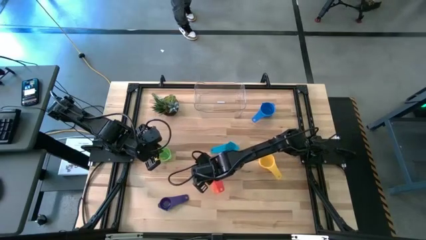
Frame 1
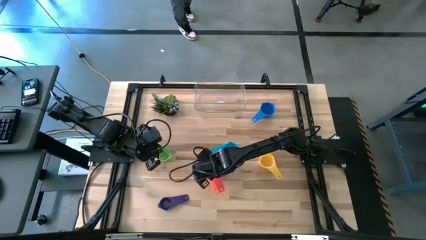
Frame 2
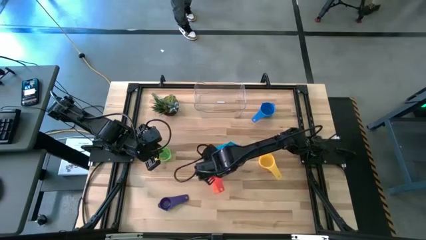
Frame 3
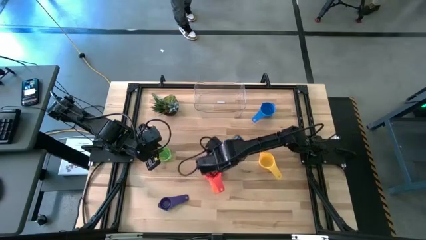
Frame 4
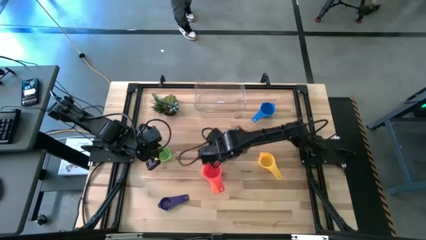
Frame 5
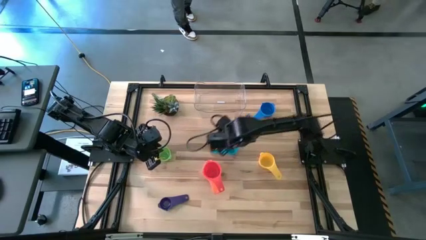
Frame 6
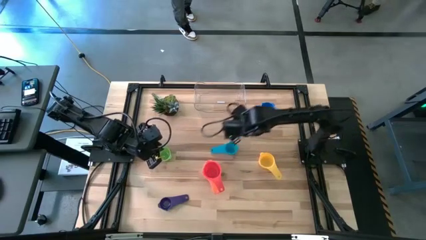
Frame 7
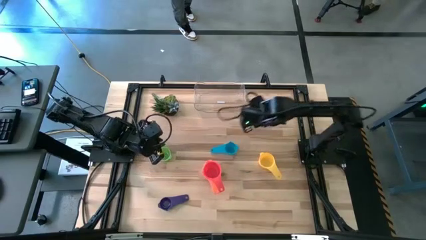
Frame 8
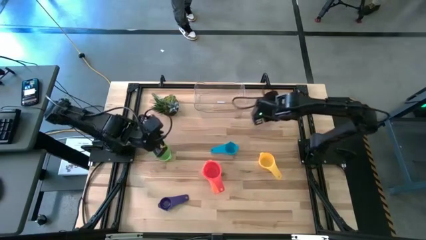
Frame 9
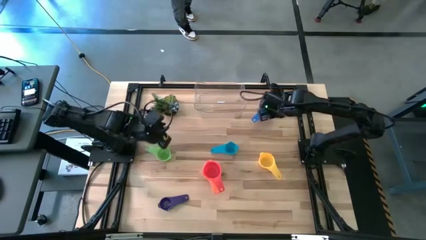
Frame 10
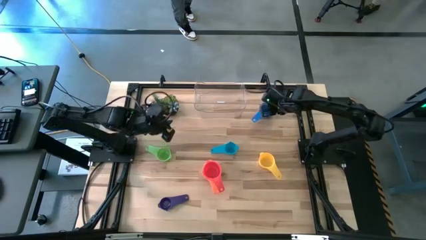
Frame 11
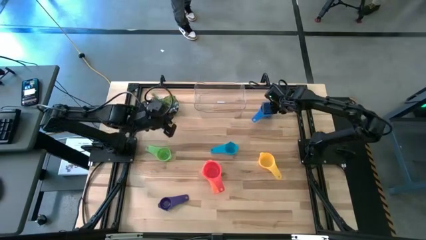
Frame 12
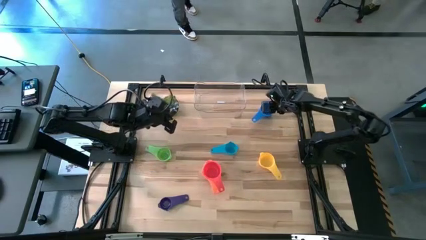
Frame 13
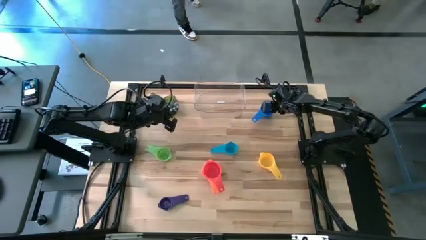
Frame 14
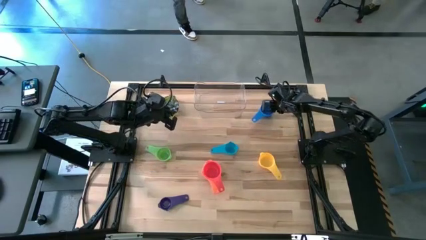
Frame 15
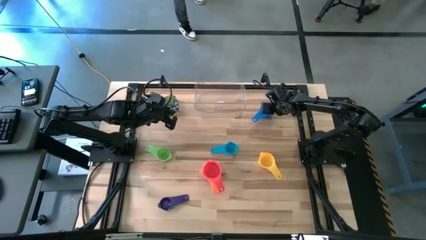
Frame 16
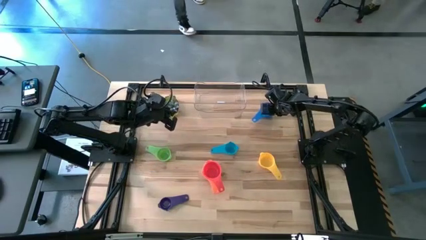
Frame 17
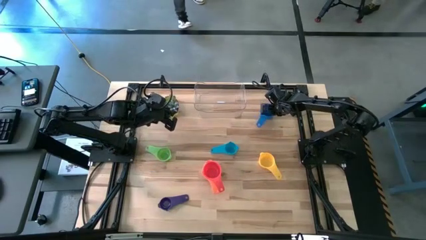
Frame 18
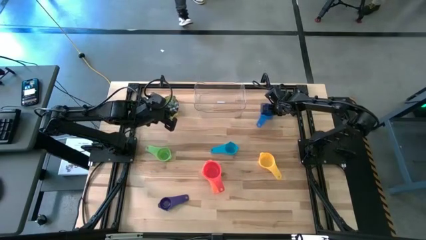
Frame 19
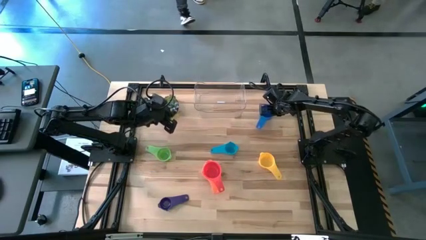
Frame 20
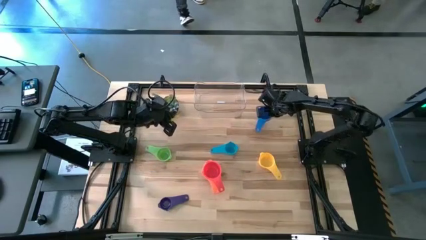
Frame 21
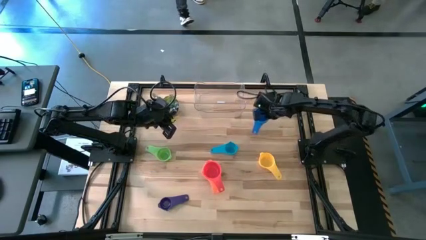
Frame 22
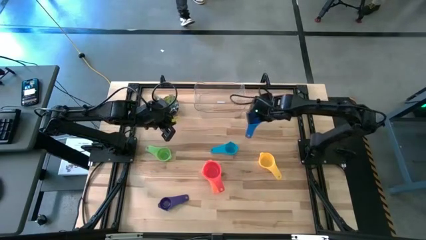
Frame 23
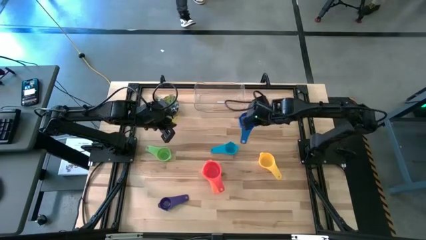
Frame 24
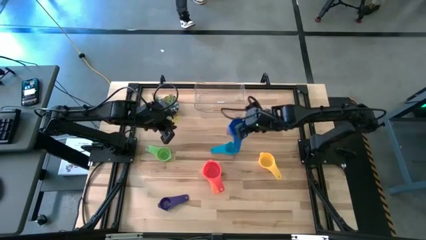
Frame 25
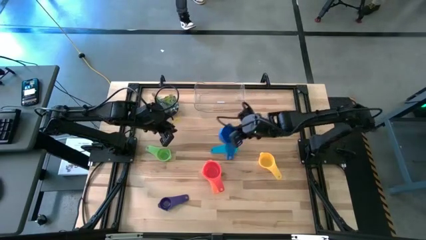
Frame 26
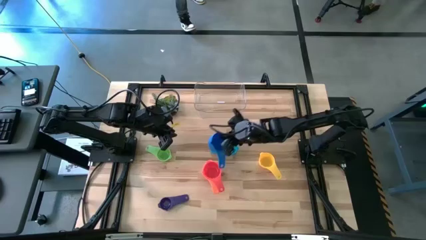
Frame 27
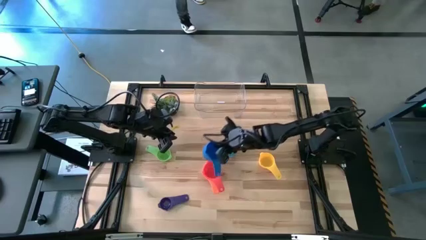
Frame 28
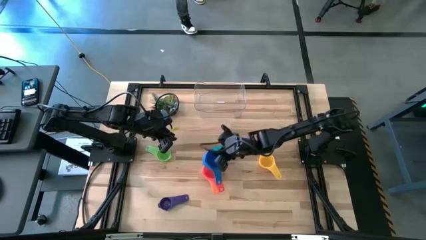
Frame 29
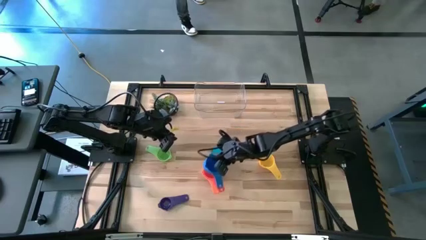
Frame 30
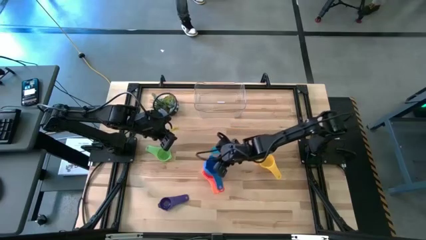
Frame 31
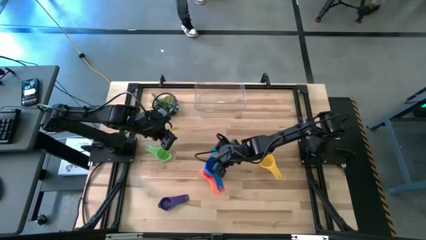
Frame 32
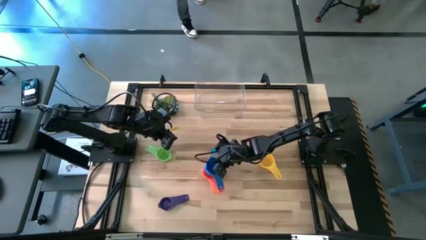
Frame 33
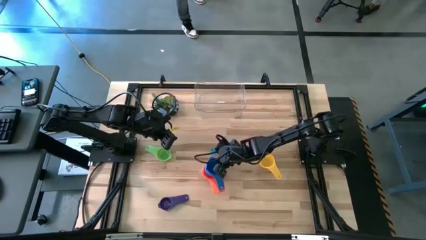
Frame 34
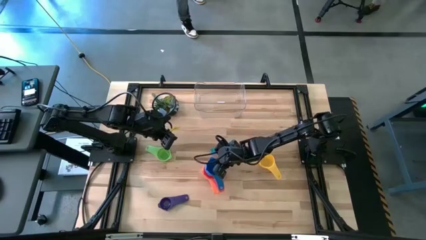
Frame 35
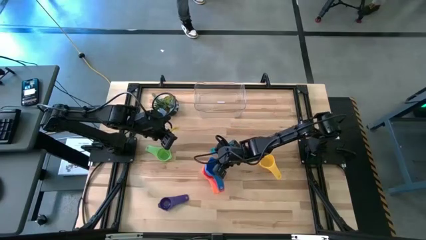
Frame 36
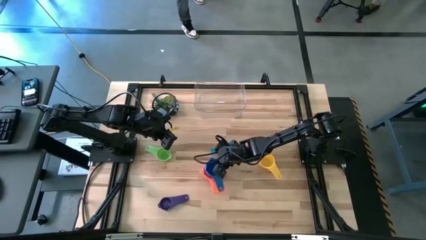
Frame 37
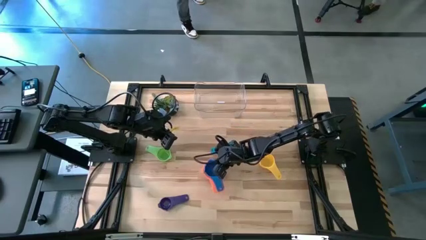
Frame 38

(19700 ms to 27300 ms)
Task: Nest measuring cups in basket
Stack the blue measuring cup on top of the red measuring cup

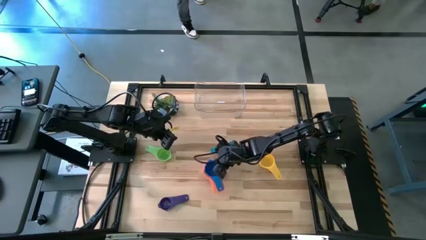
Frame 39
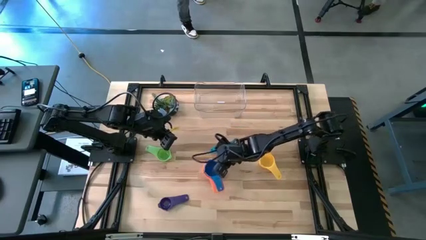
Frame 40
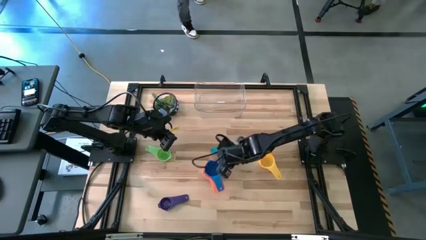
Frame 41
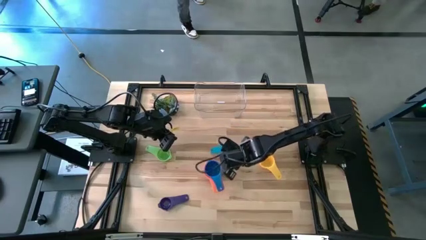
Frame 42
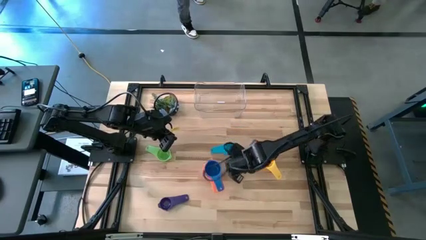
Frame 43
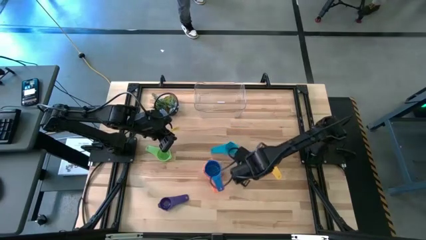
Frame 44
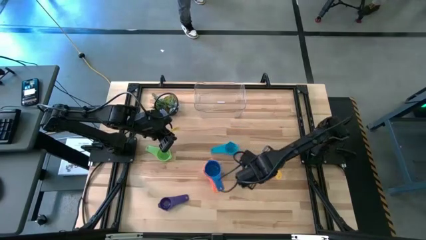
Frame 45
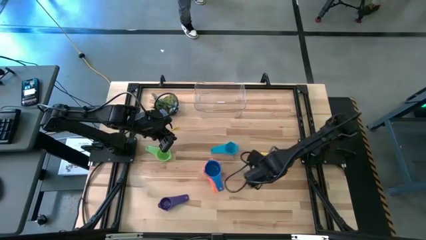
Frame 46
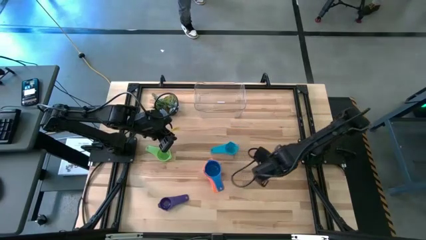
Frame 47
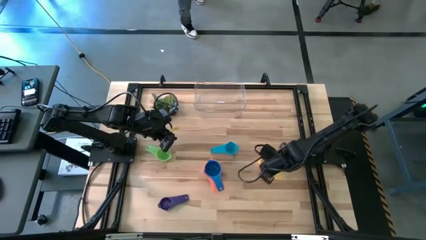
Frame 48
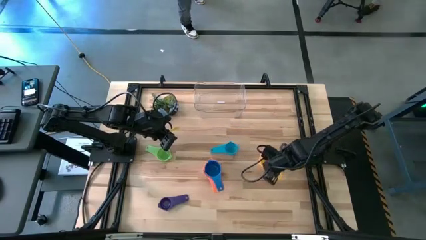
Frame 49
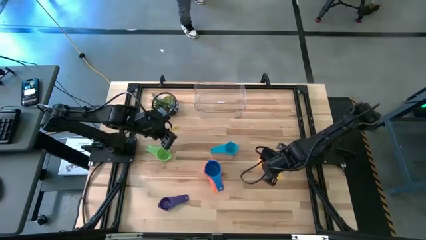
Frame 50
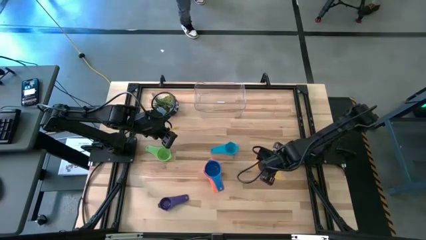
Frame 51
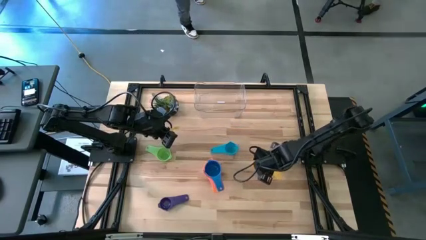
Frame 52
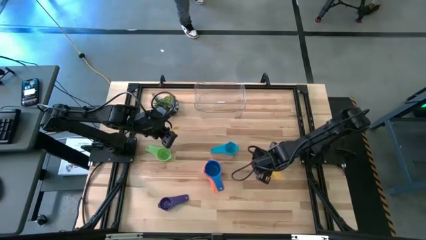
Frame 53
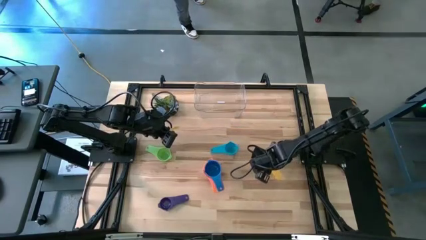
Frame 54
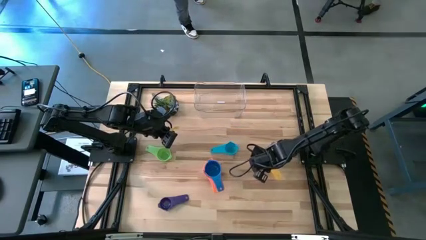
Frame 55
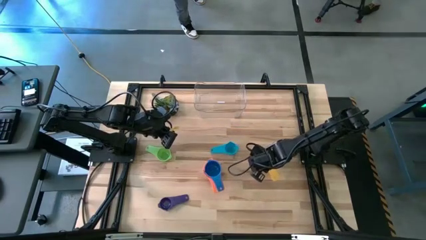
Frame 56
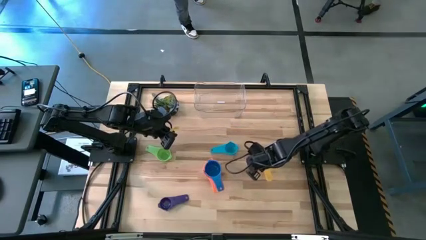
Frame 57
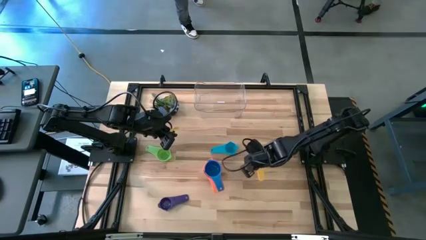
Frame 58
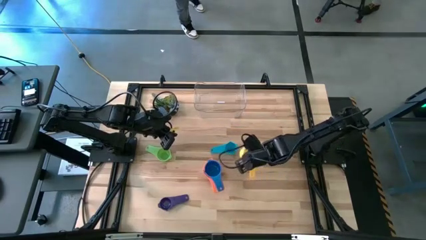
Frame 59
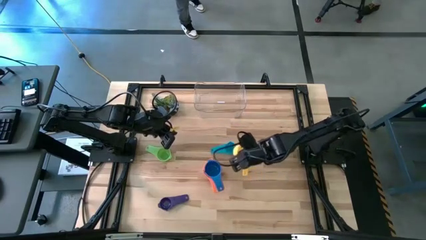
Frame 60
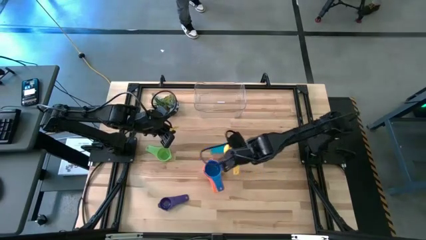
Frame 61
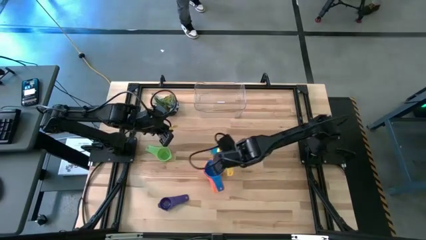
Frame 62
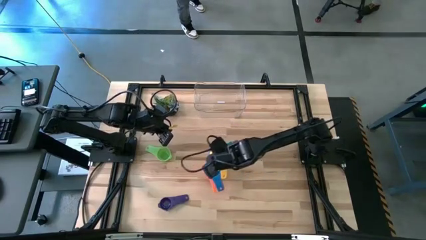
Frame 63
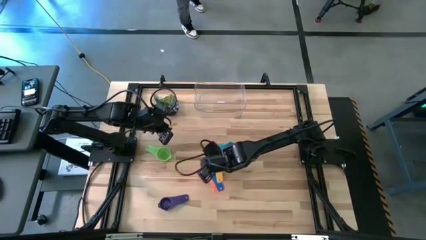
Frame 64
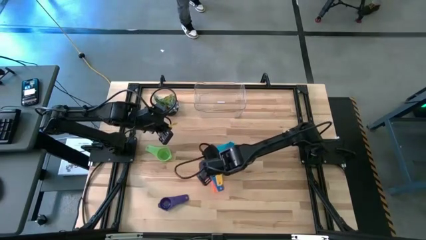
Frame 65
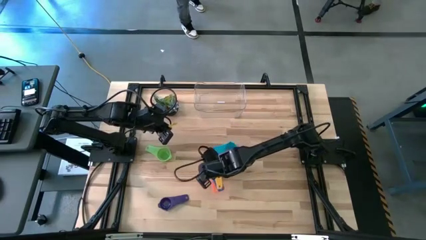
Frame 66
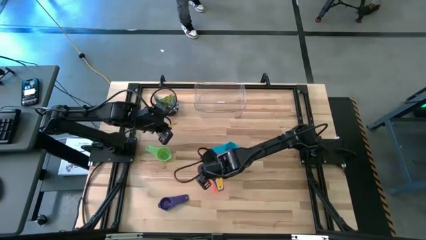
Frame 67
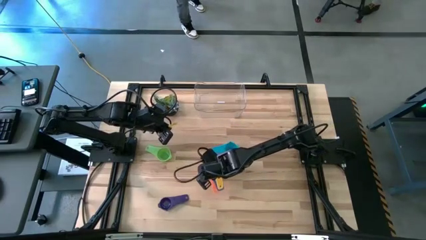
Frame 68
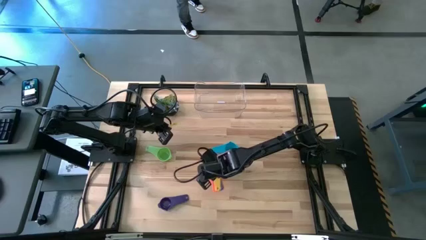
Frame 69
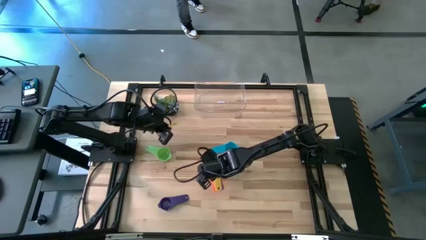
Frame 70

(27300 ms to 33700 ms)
Stack the yellow measuring cup on top of the blue measuring cup

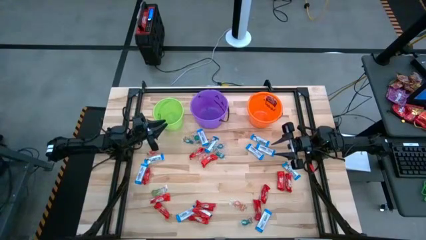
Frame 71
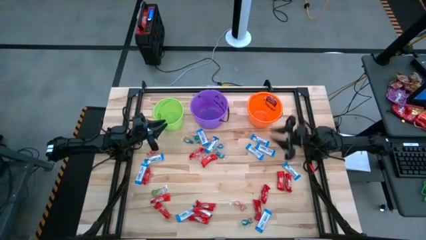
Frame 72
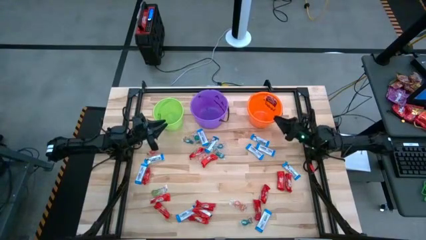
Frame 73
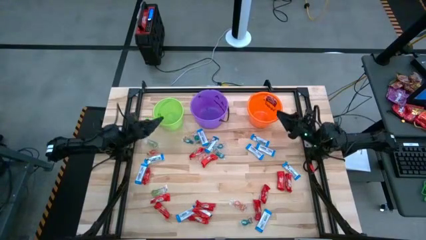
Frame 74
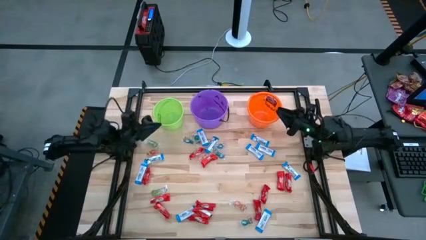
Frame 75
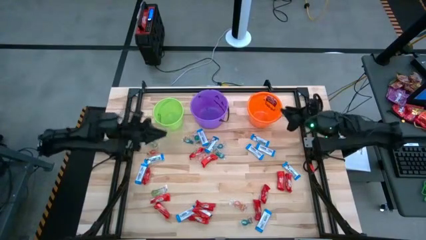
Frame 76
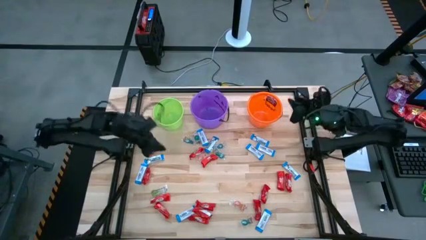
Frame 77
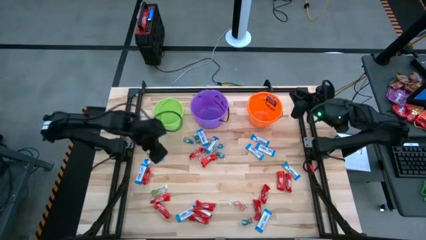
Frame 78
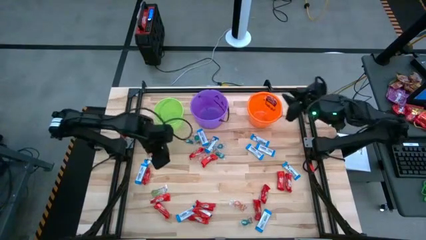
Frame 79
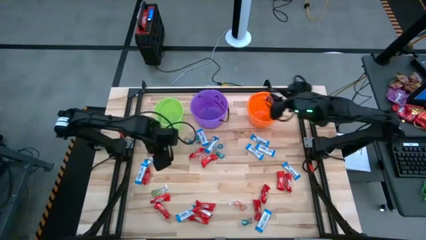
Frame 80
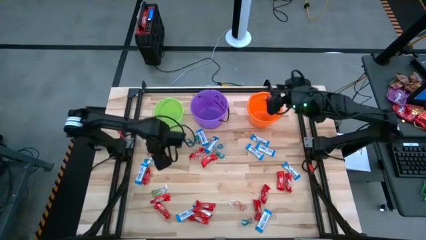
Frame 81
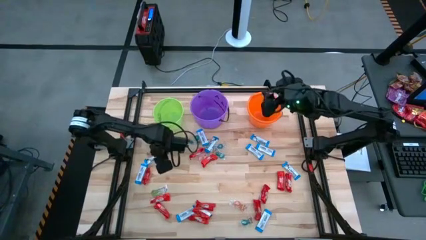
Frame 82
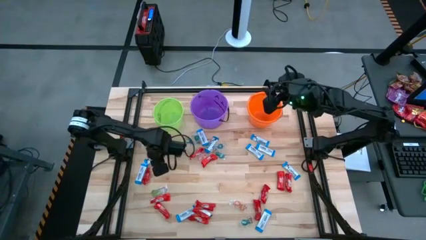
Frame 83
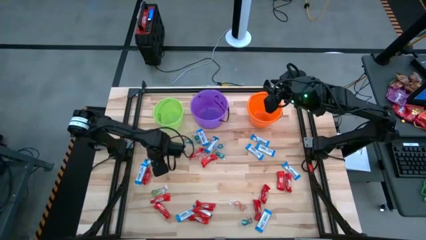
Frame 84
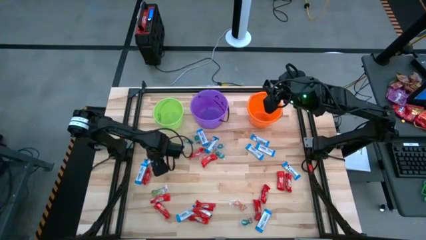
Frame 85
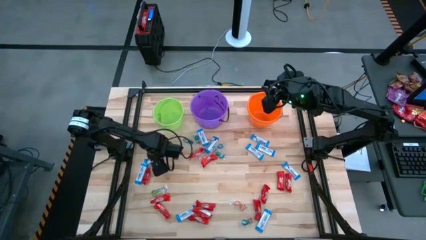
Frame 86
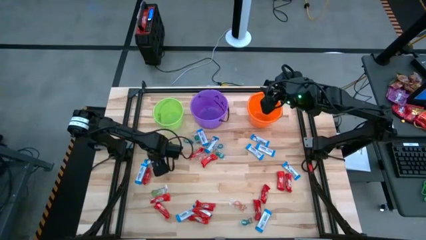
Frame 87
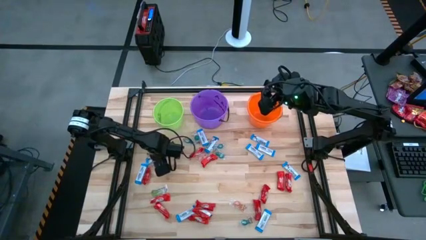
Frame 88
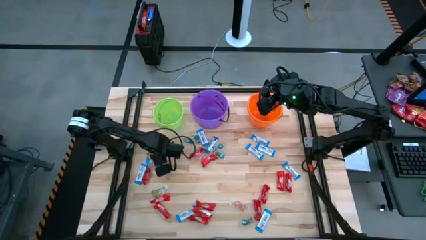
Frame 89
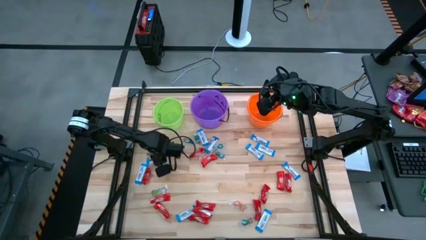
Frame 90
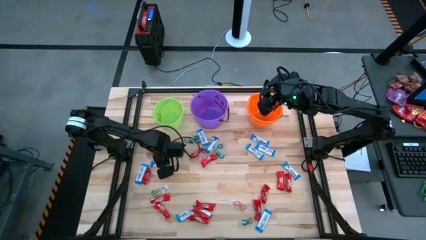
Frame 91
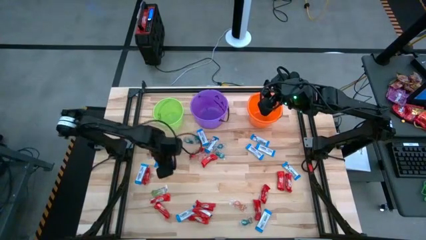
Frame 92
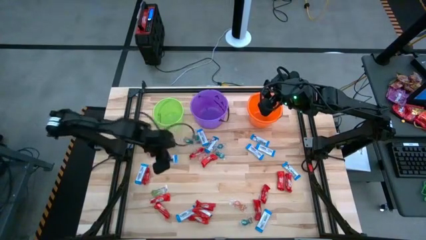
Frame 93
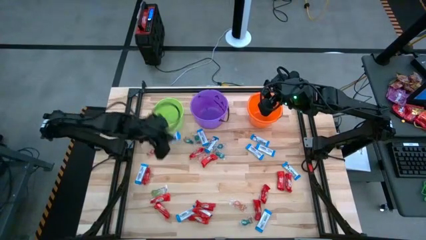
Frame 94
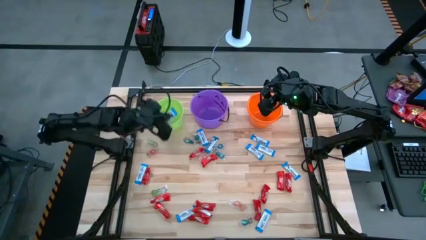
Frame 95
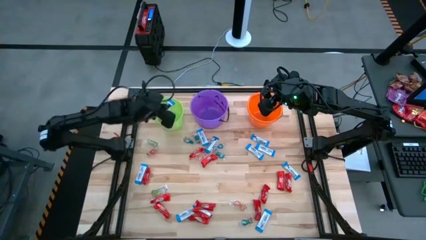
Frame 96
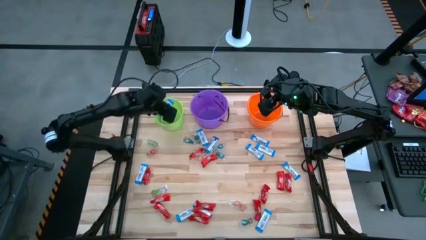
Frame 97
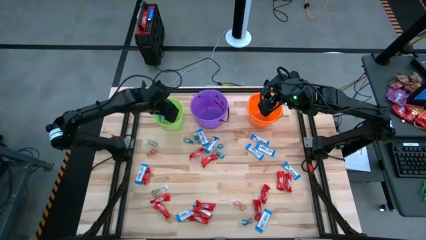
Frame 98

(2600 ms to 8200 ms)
Task: Sort candy by brand, put in halloween buckets
Put the white chocolate into the green bucket
